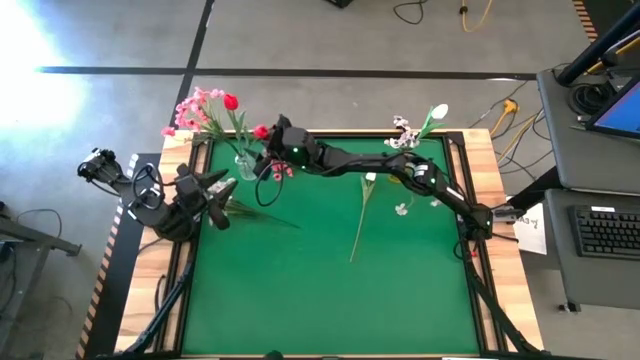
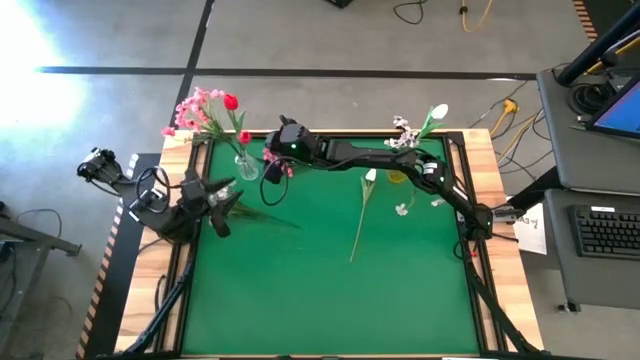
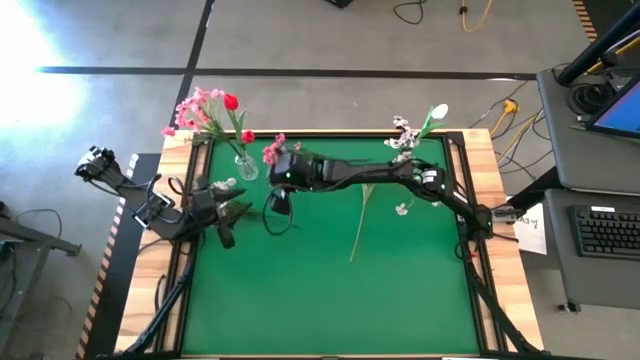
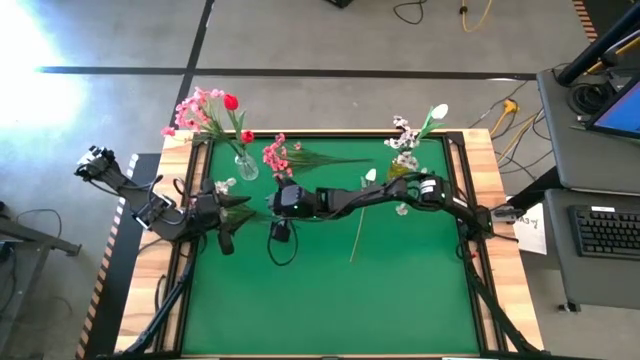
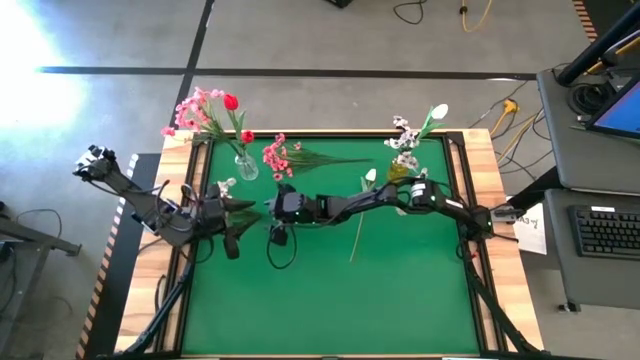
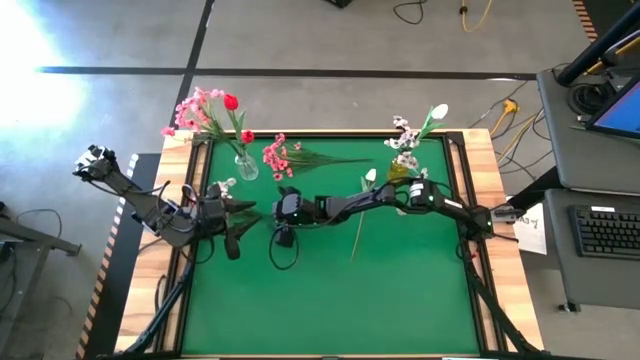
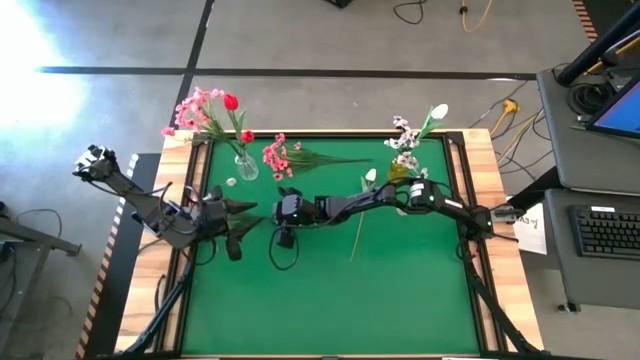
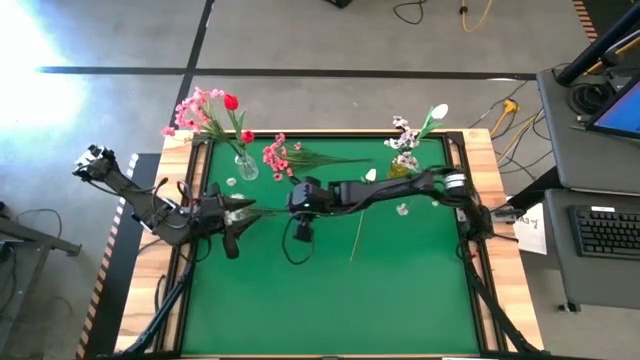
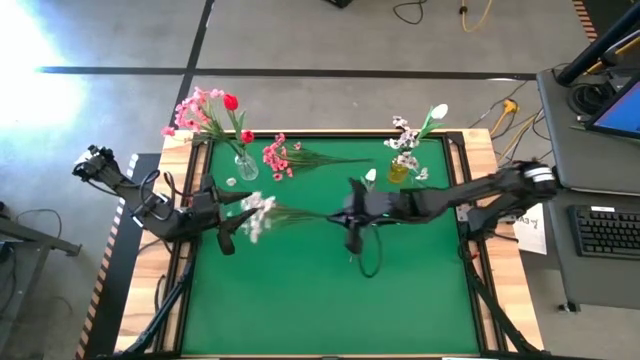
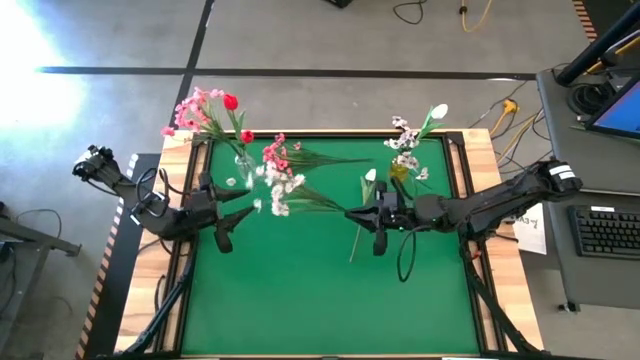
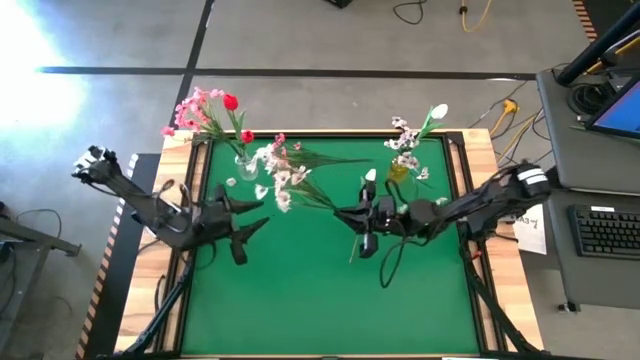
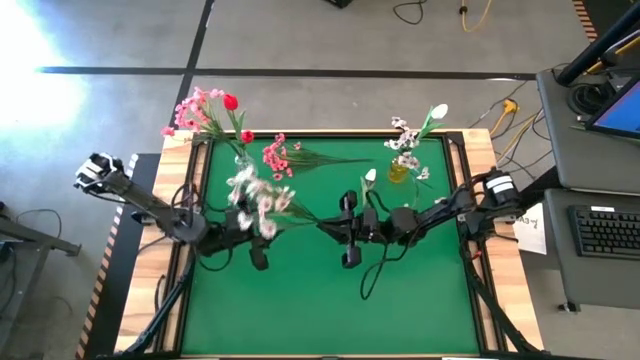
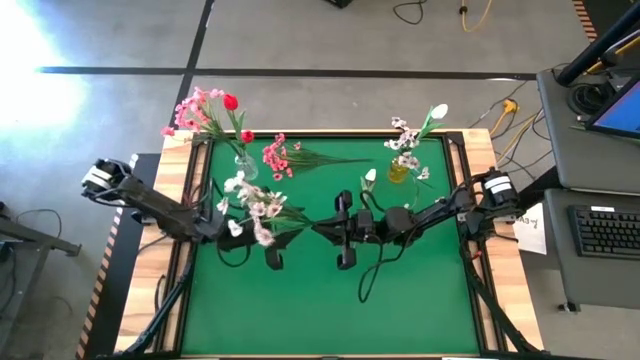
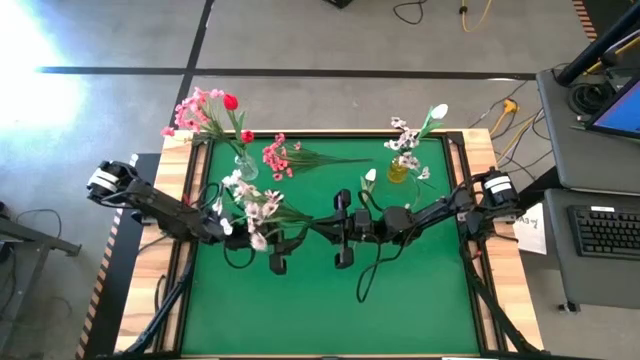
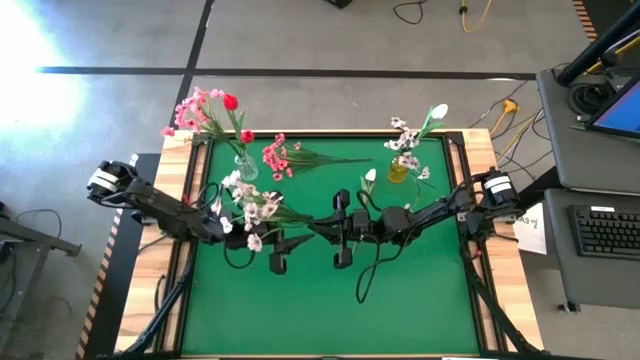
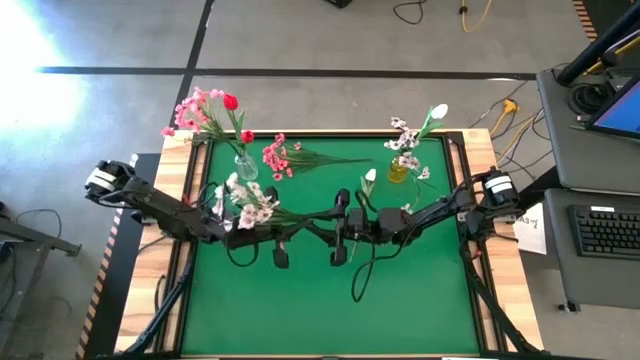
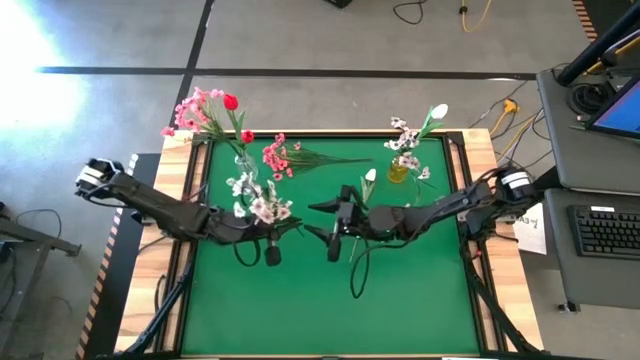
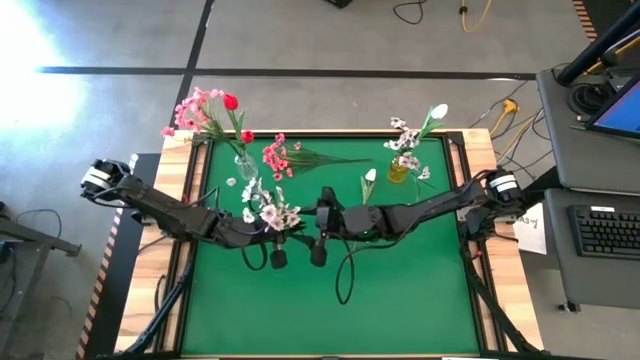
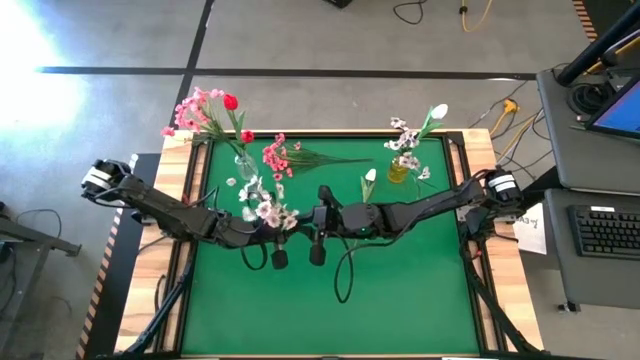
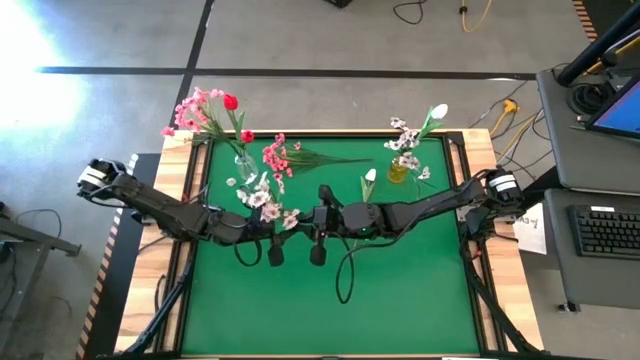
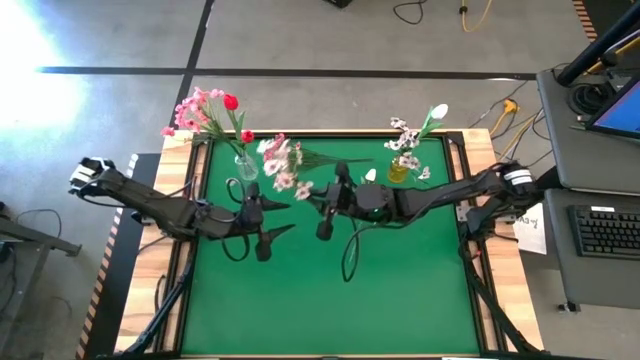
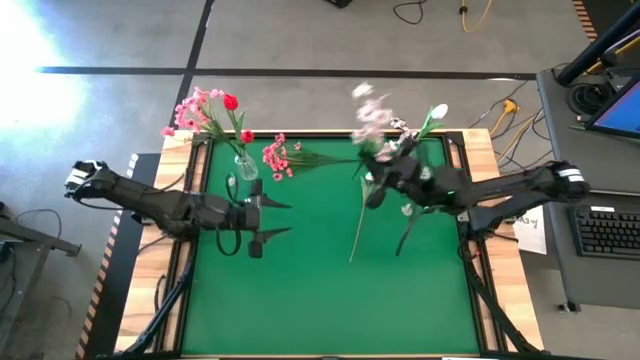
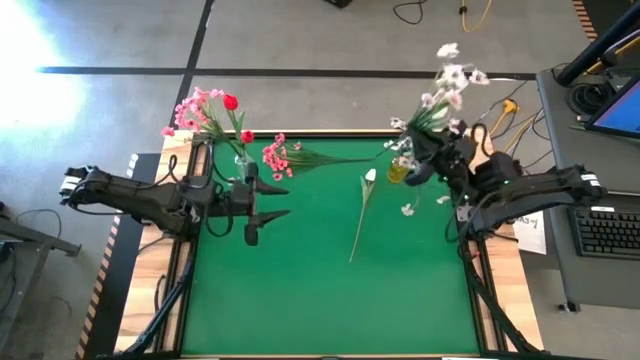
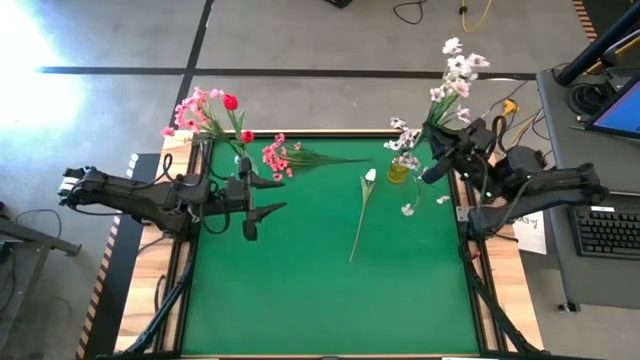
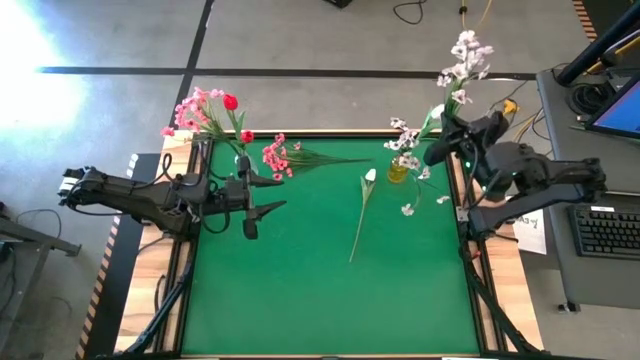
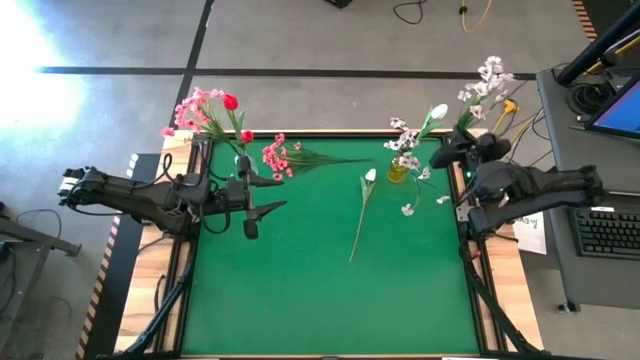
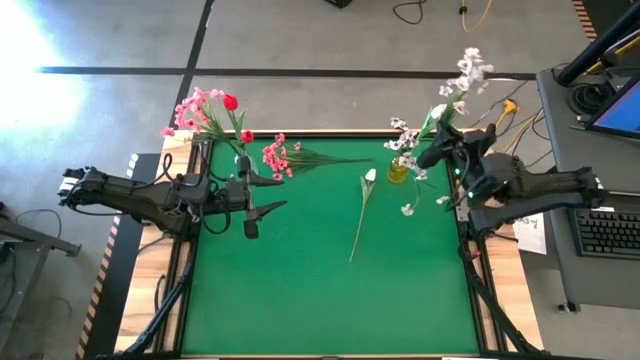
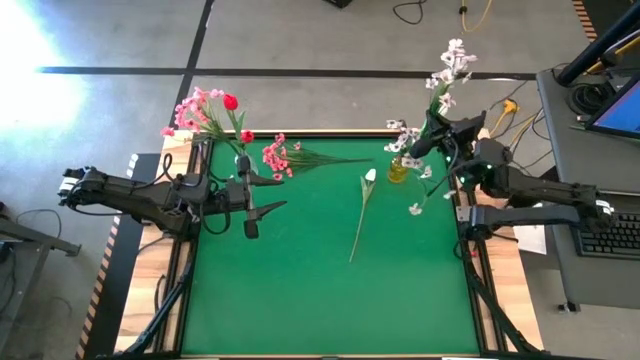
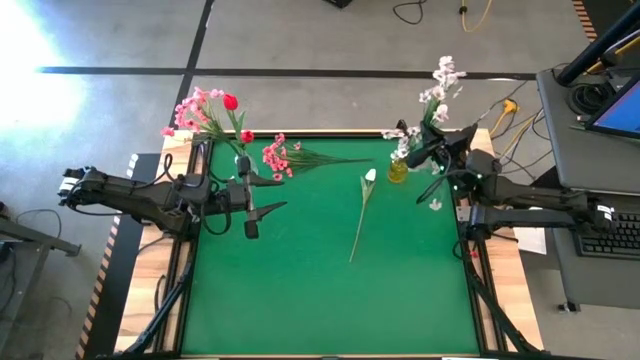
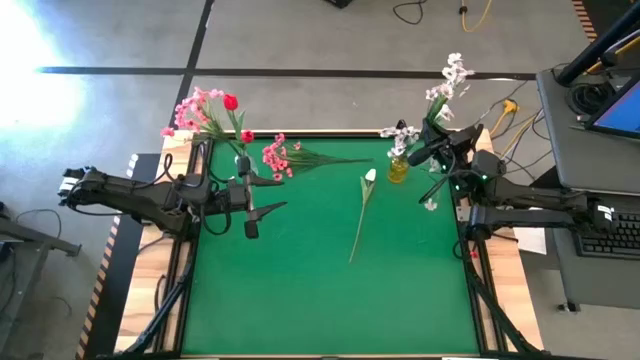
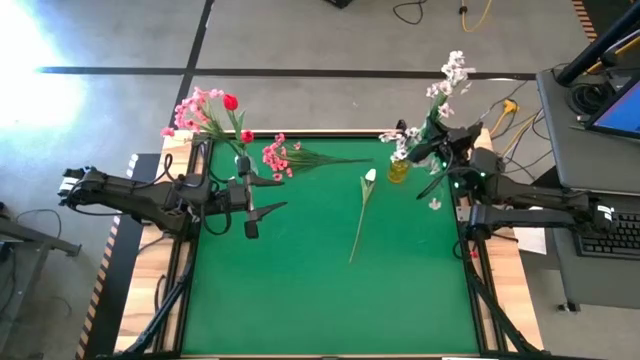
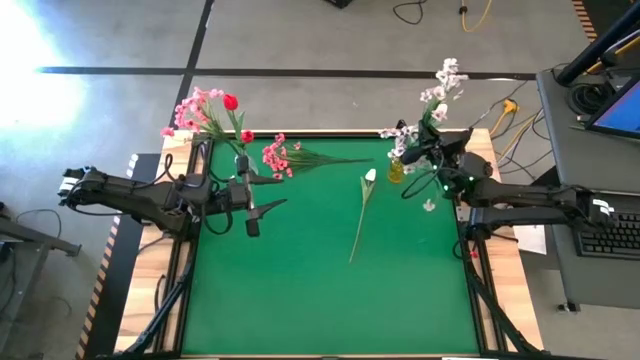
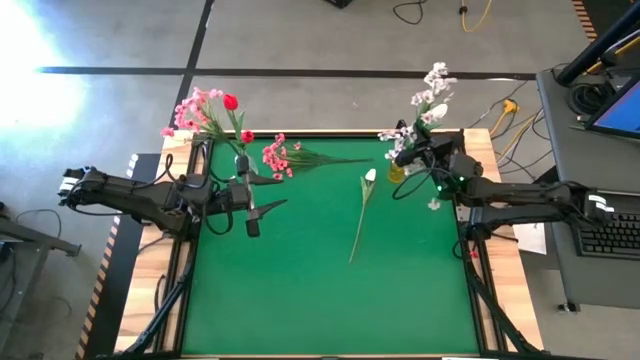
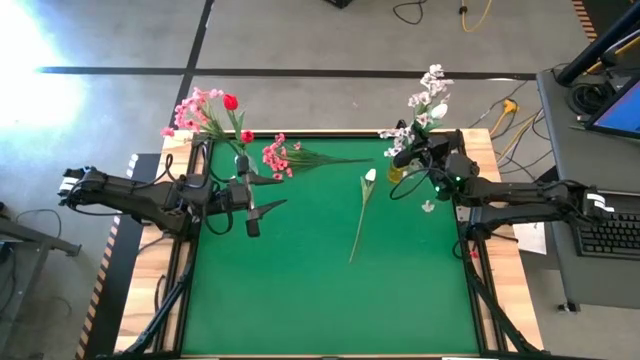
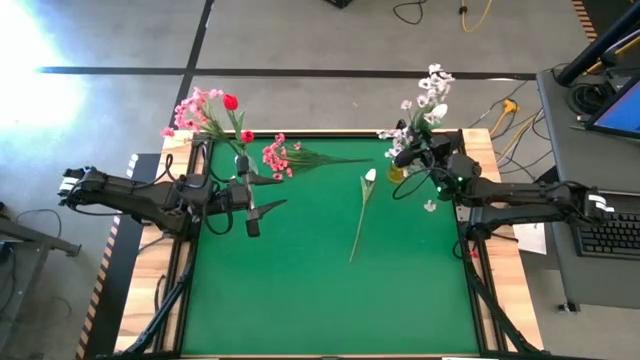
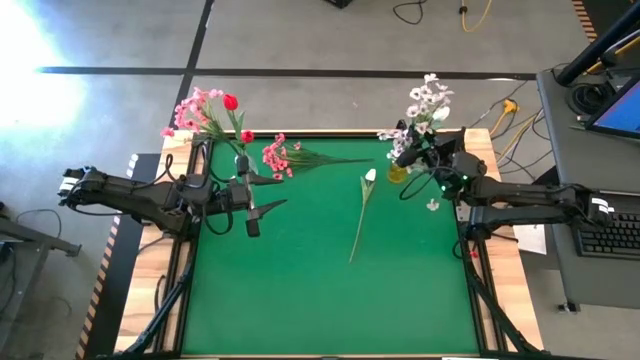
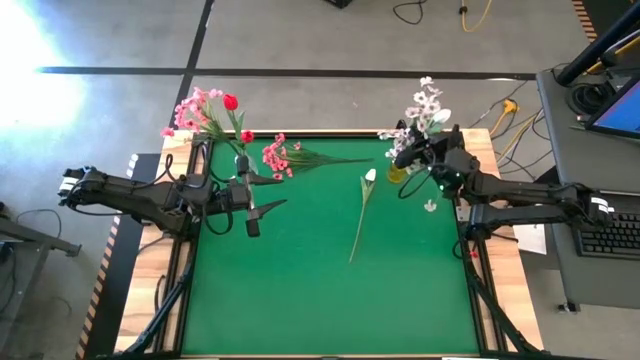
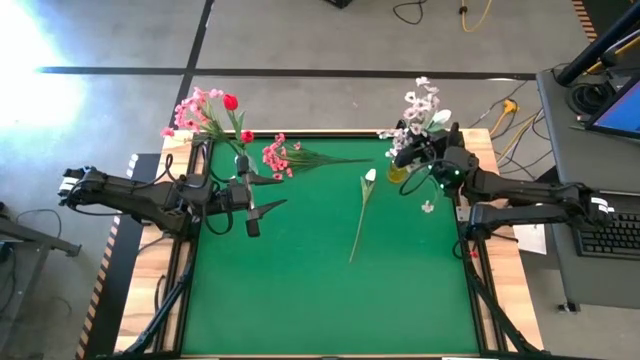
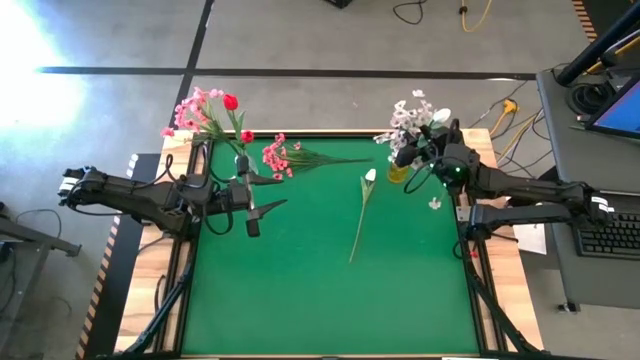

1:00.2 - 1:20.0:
Task: Sort flowers into vase by color
Put the white flowers into the yellow vase
